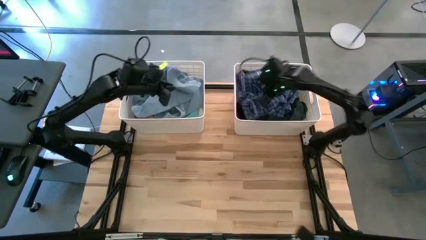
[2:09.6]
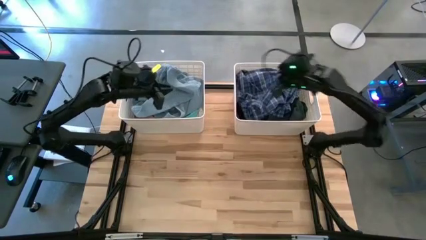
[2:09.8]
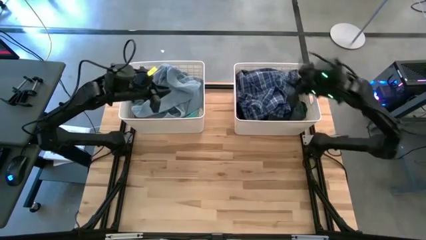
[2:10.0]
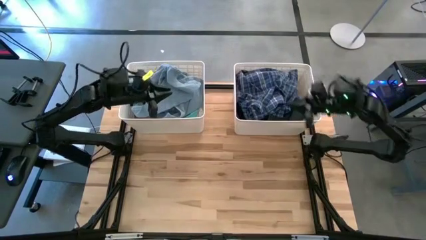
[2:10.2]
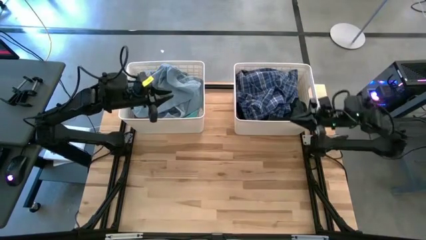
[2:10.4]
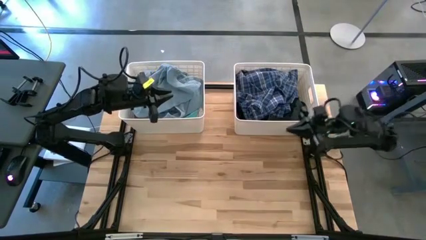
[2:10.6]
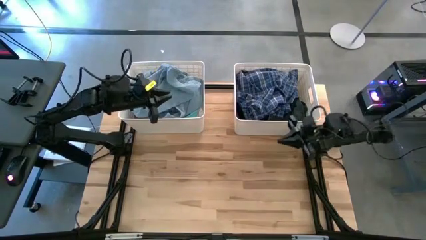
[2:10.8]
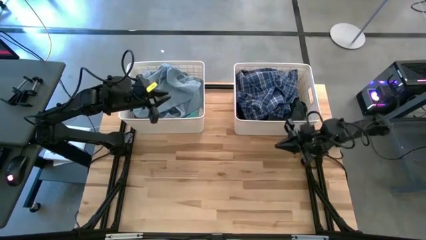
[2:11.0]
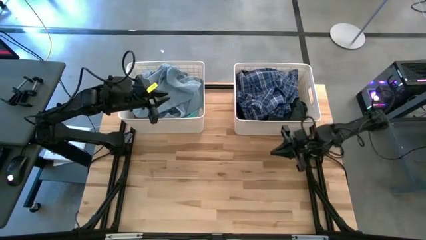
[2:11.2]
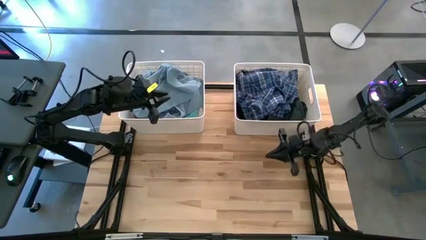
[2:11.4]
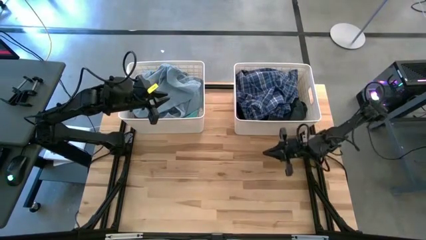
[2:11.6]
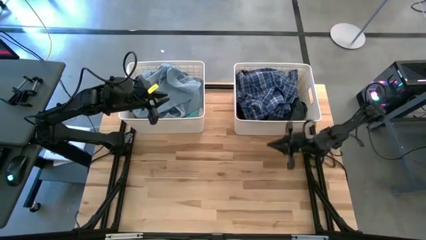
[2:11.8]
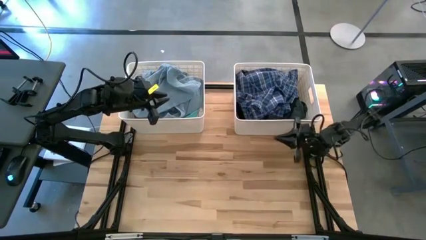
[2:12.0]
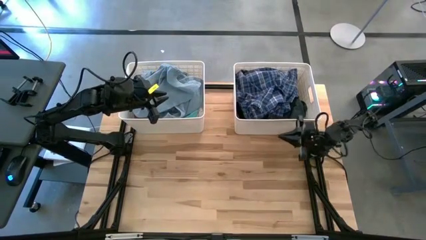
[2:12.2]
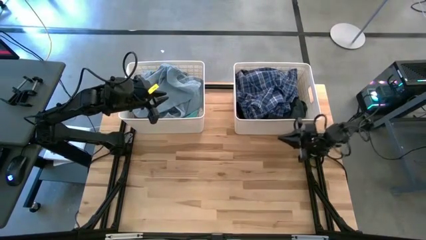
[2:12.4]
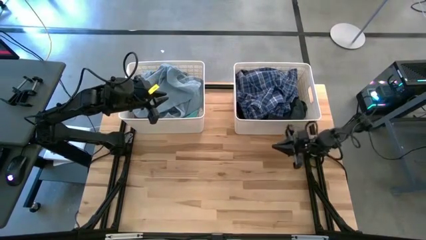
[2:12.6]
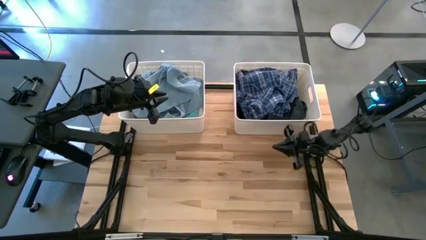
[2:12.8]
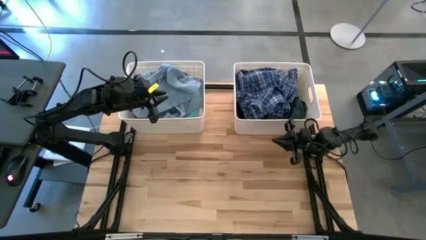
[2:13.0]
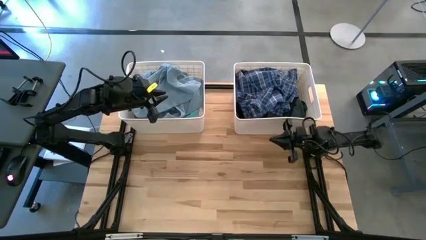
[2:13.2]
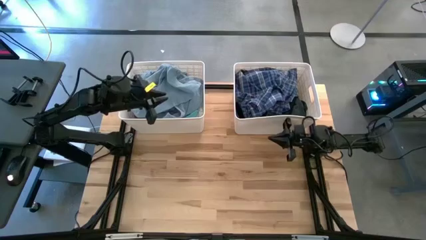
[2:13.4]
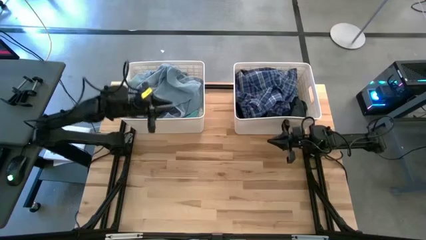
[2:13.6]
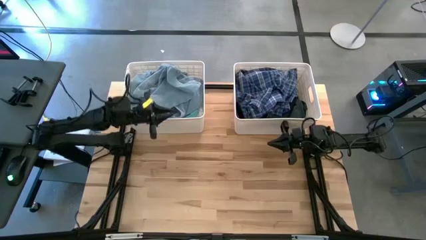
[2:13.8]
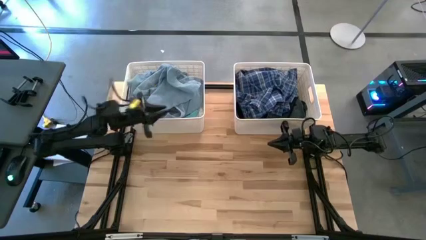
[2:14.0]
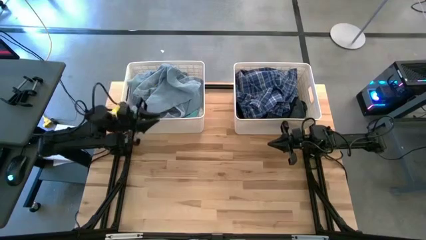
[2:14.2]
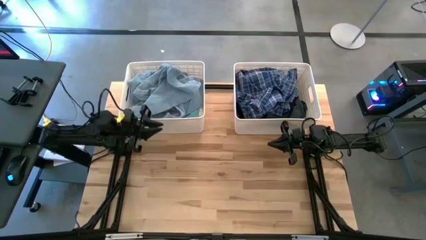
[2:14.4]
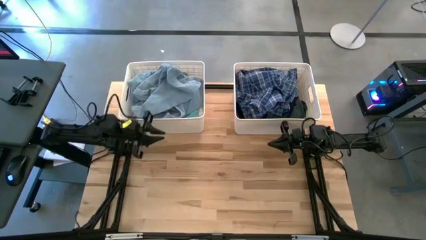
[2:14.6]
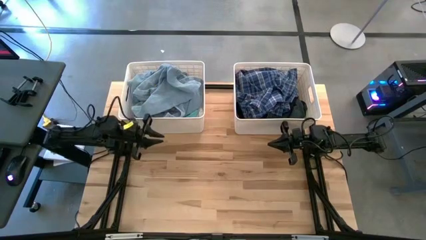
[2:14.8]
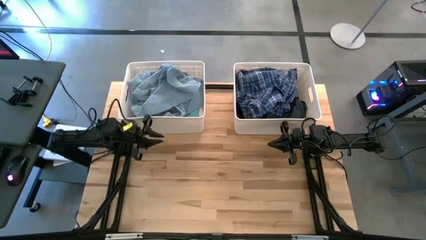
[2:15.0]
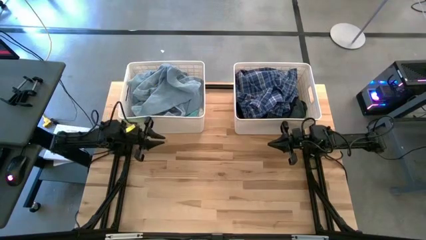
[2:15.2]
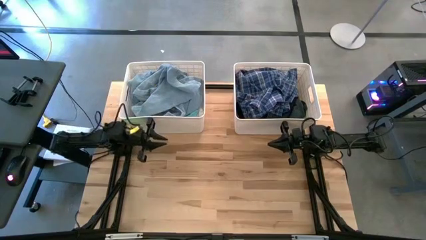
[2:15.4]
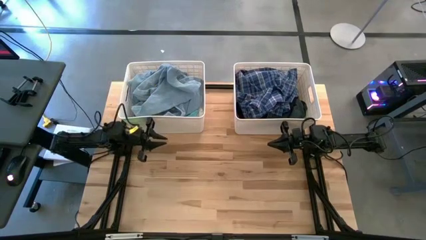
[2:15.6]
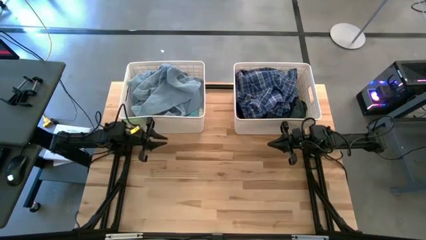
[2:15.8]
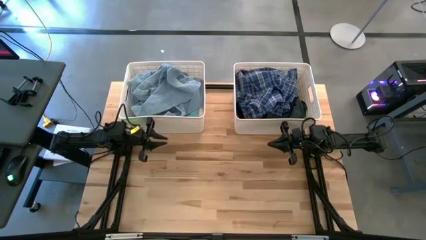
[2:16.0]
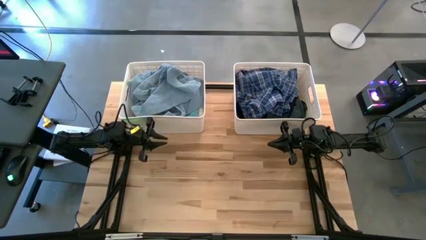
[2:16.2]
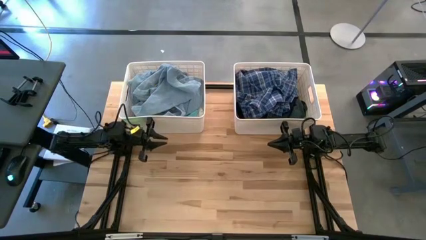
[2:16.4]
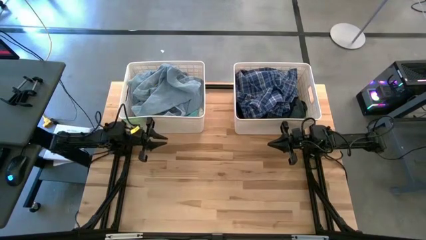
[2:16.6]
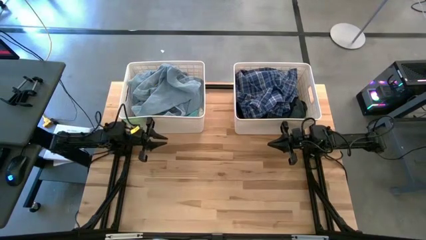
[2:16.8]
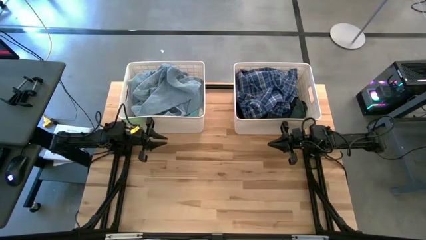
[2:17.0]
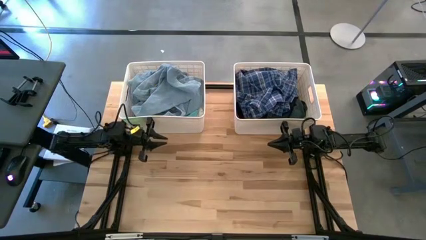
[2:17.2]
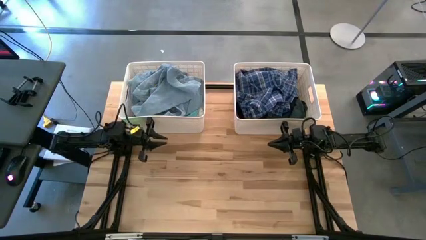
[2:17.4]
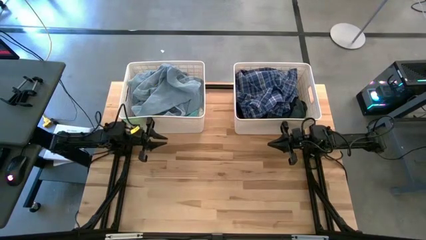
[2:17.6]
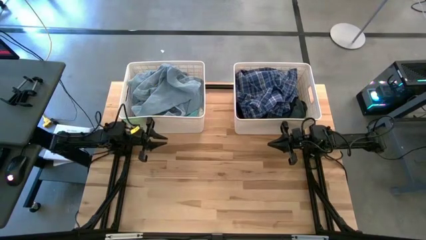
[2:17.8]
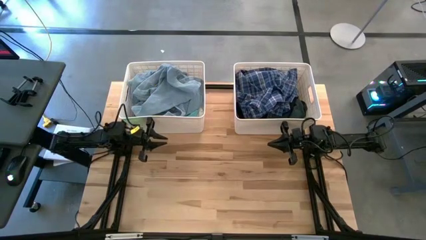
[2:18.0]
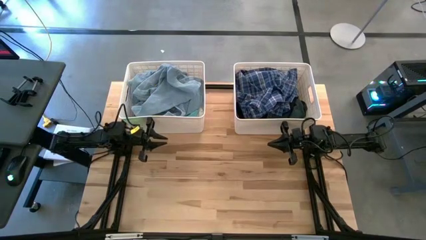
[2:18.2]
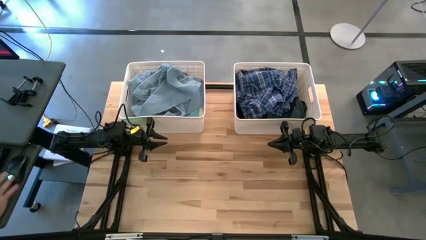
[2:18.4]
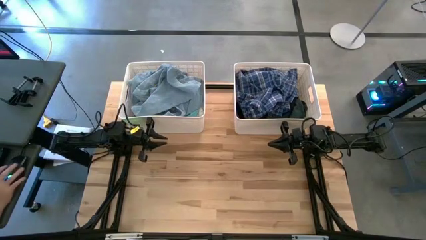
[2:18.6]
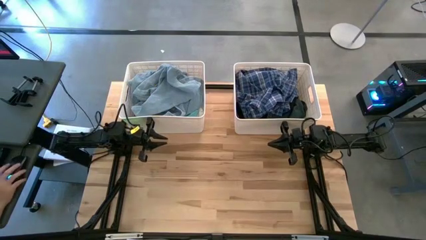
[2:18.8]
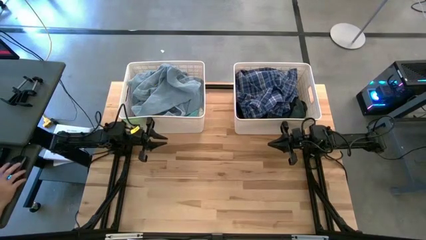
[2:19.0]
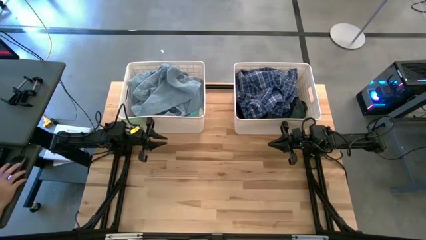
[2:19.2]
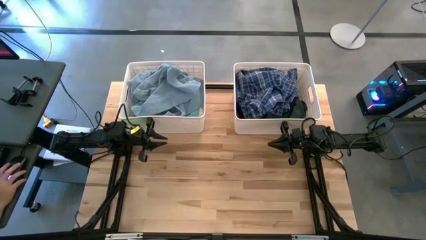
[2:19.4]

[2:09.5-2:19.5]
Task: Sort clothes
Return to Home Position

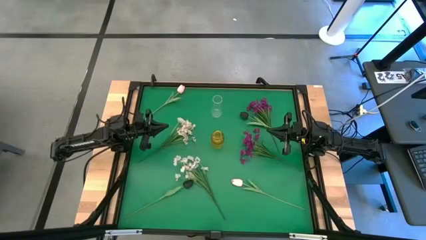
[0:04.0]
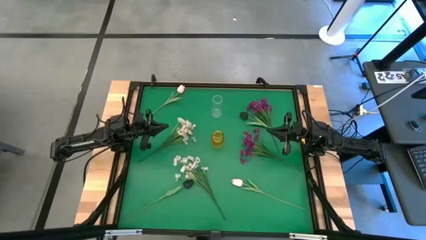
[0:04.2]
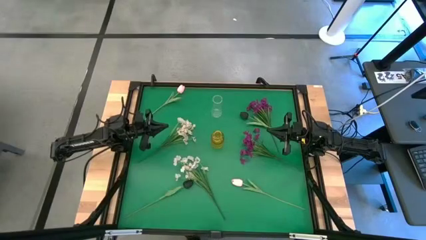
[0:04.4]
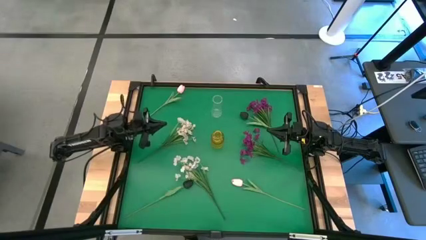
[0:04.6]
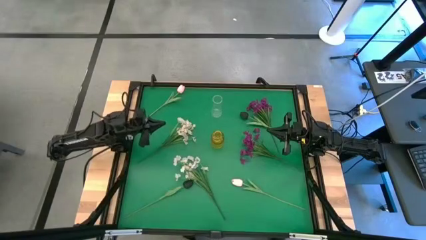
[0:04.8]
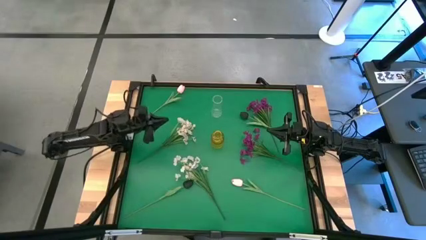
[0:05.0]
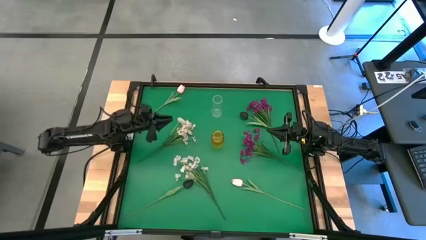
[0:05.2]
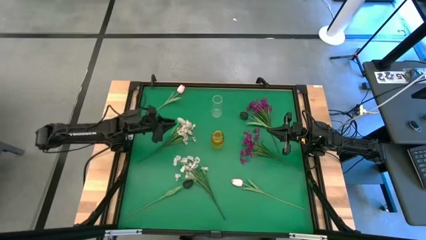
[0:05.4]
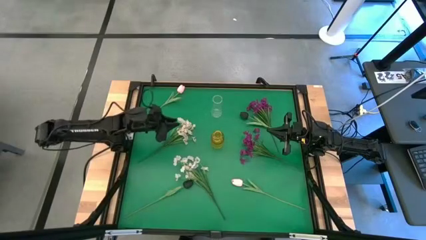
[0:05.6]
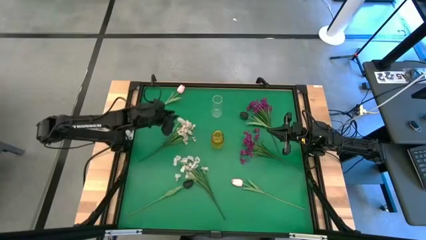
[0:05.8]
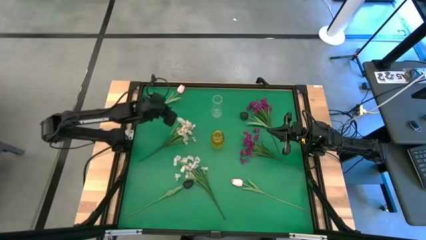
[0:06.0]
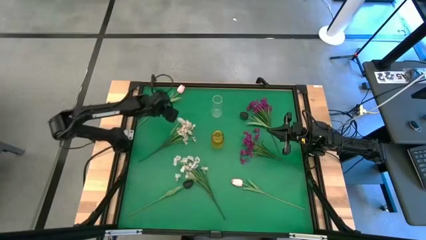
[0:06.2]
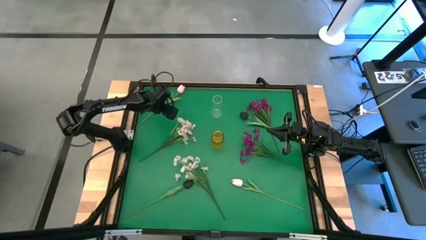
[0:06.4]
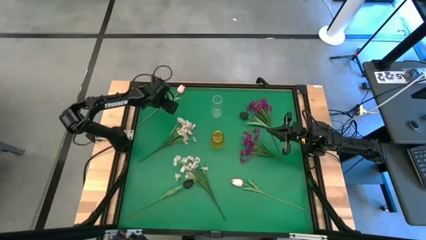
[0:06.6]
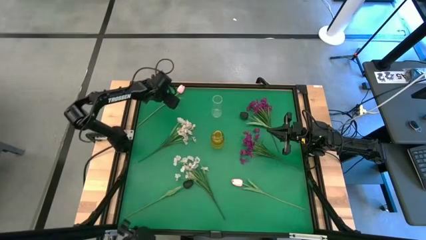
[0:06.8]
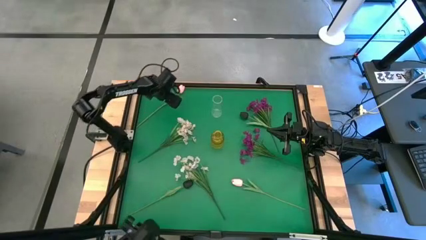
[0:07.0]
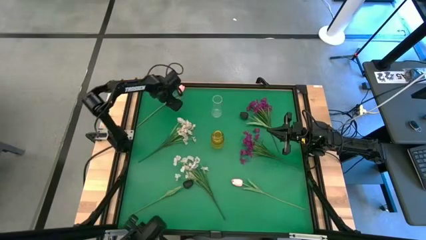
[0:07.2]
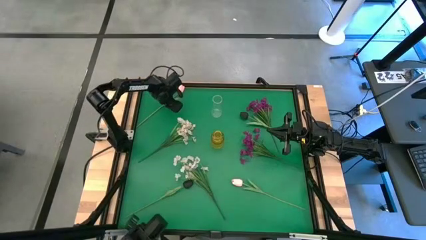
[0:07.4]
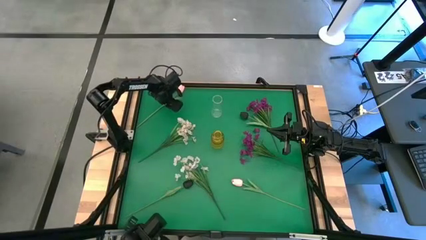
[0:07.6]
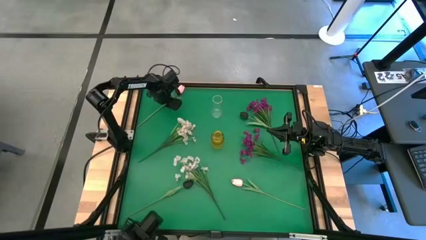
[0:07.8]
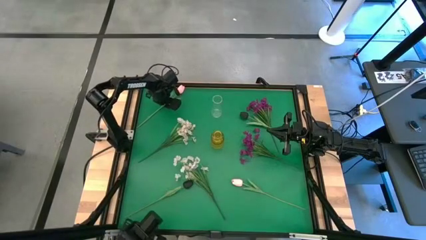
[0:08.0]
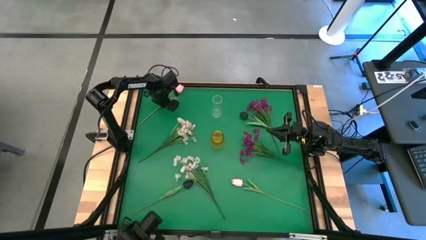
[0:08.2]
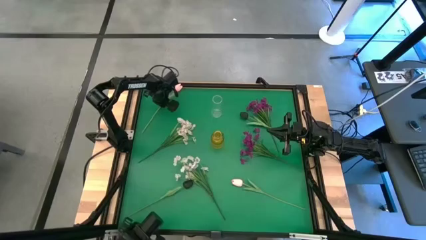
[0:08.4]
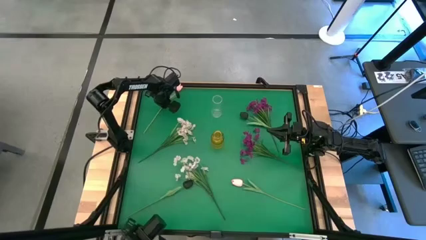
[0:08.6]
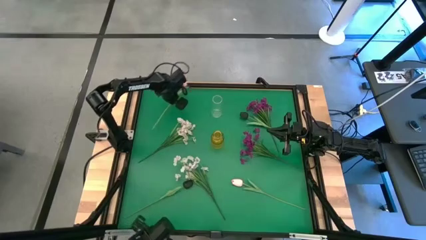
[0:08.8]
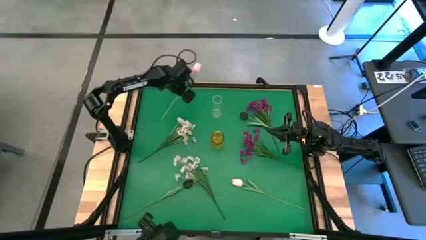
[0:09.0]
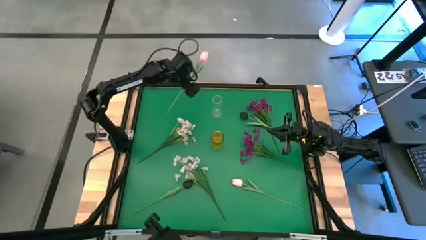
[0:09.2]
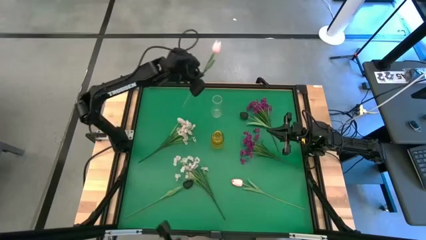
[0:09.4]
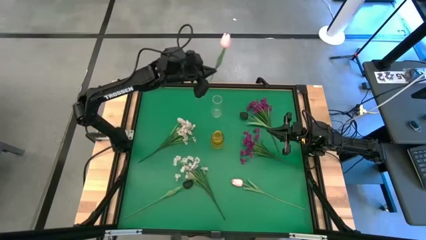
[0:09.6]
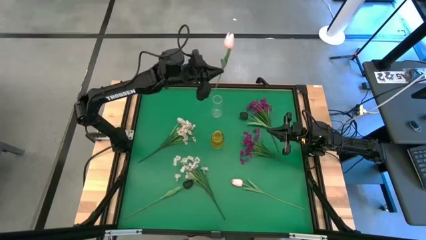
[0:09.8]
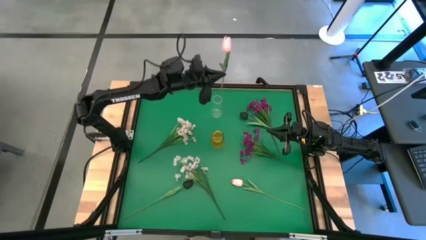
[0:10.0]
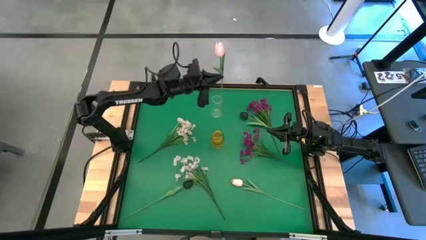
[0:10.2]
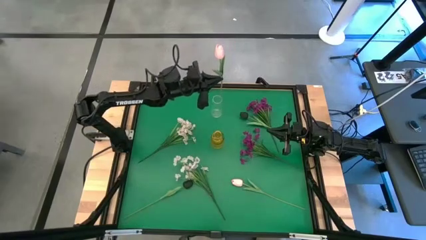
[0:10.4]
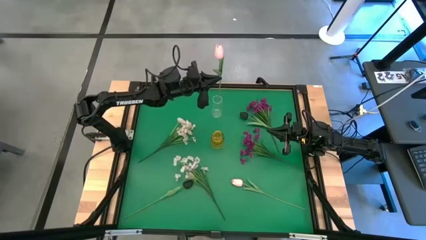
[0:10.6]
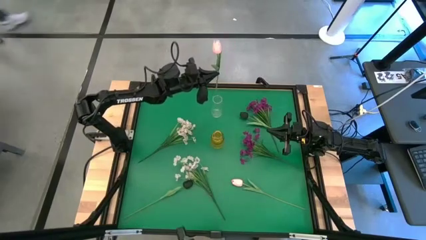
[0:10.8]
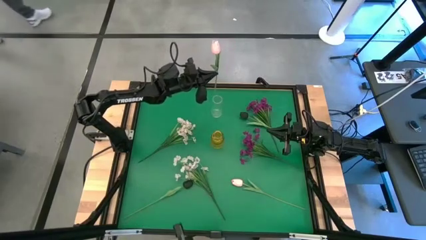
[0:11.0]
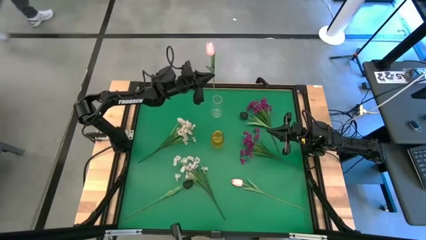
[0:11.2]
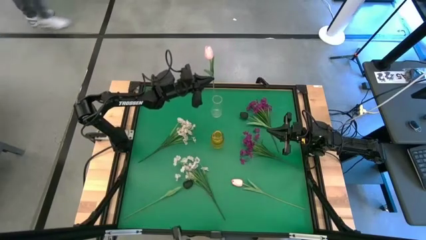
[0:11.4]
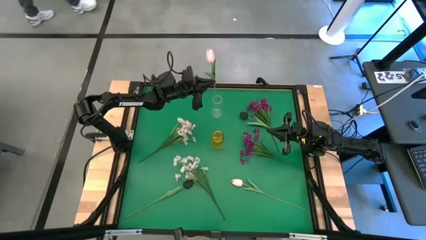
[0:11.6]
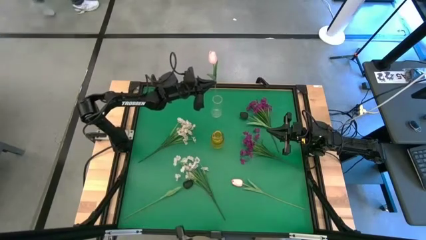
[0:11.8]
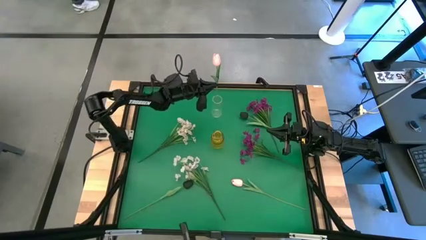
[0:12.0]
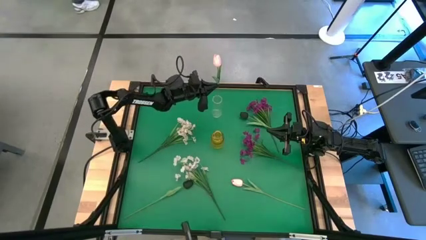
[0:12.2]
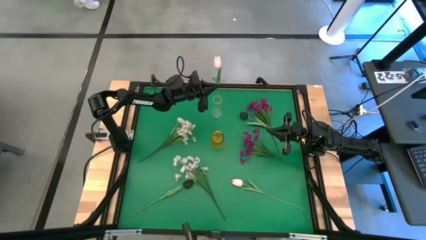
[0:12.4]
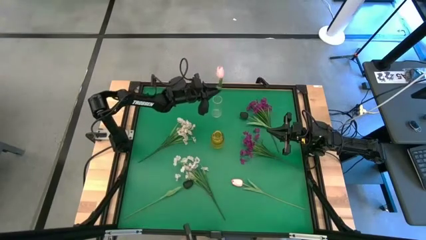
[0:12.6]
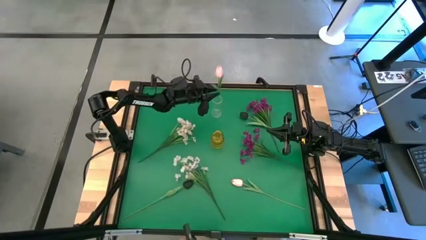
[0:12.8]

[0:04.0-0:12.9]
Task: Sort flowers into vase by color
Put the top pink flower into the transparent vase
